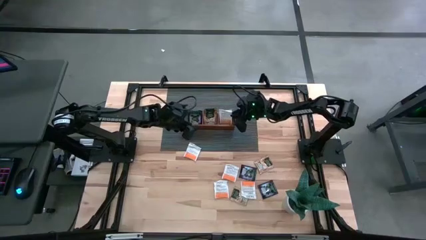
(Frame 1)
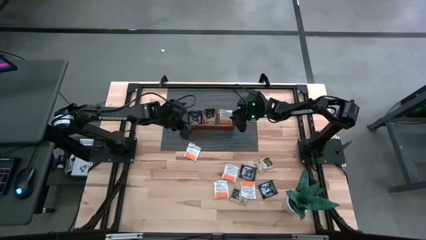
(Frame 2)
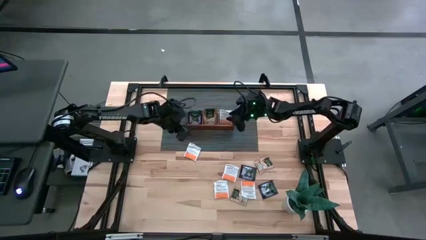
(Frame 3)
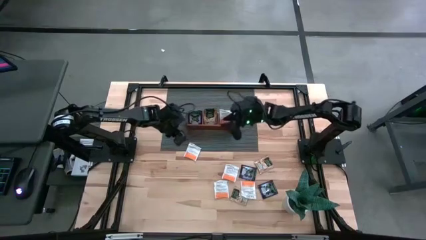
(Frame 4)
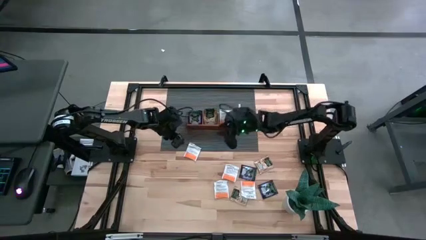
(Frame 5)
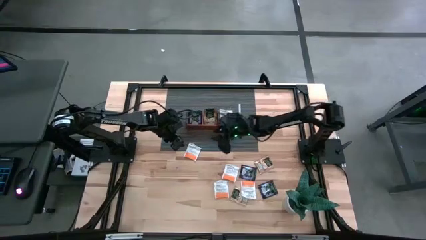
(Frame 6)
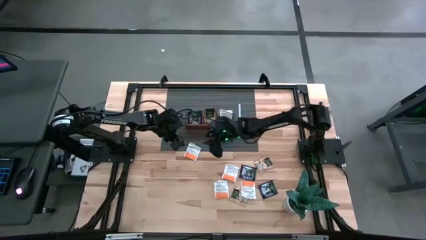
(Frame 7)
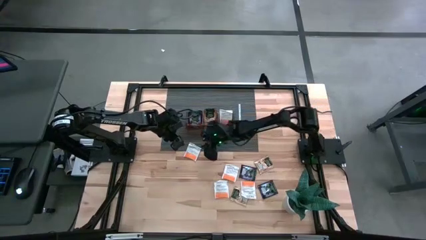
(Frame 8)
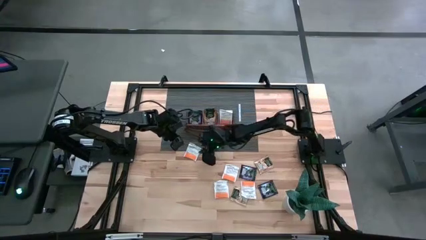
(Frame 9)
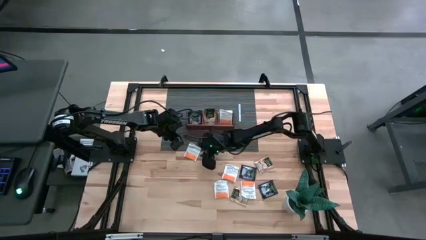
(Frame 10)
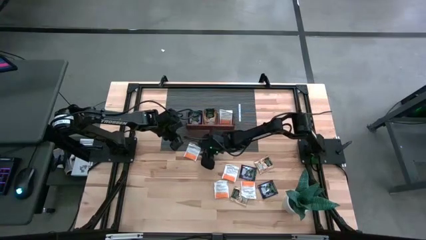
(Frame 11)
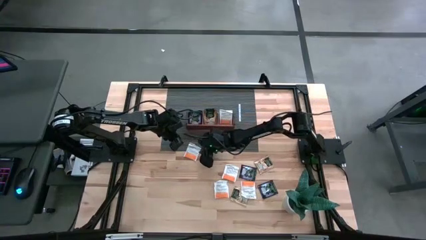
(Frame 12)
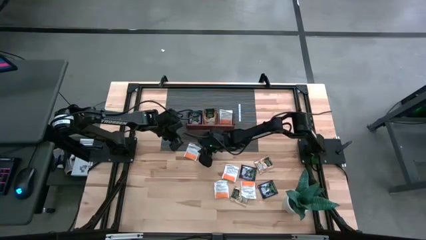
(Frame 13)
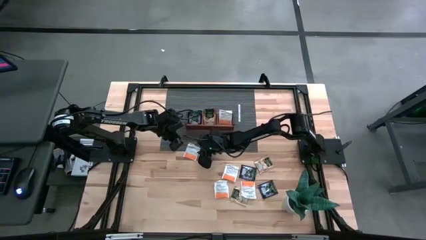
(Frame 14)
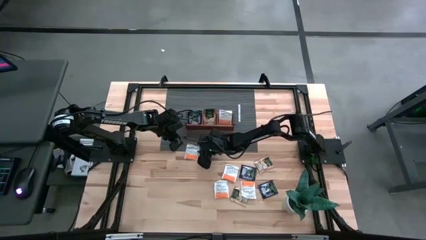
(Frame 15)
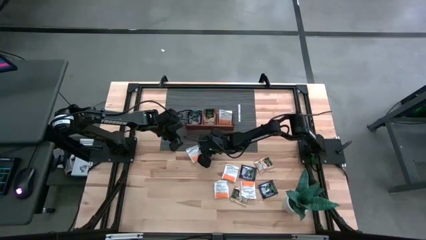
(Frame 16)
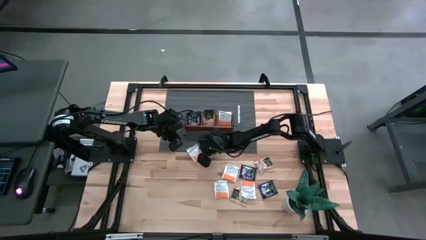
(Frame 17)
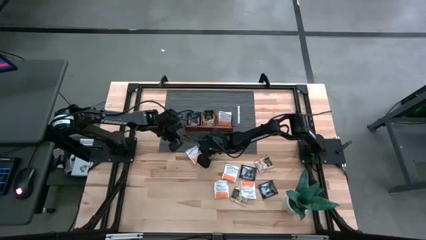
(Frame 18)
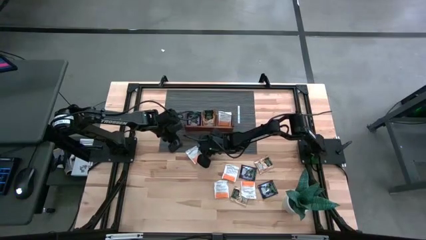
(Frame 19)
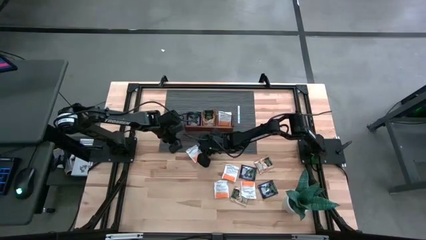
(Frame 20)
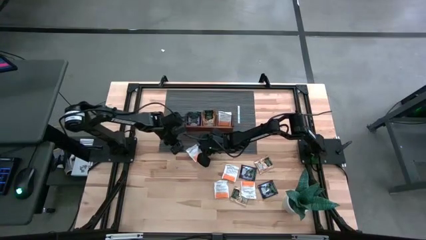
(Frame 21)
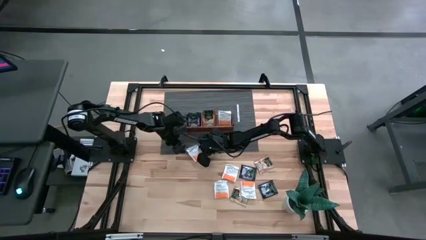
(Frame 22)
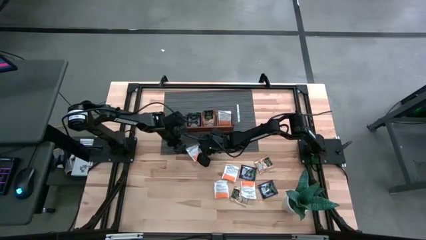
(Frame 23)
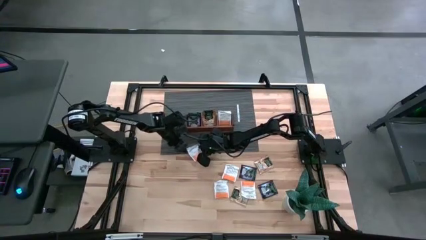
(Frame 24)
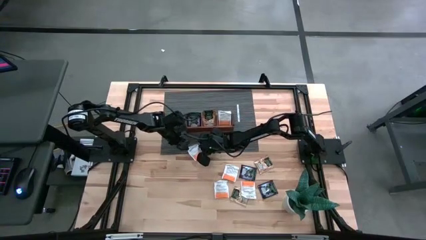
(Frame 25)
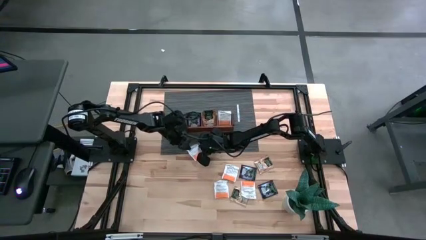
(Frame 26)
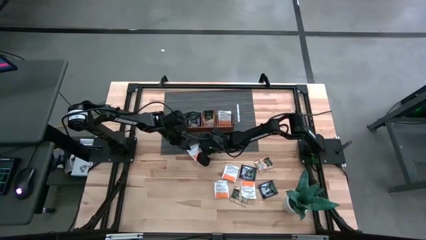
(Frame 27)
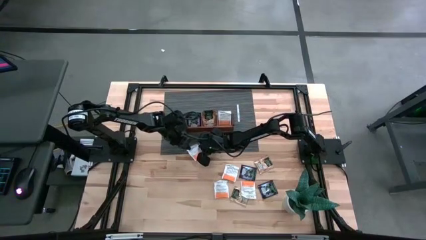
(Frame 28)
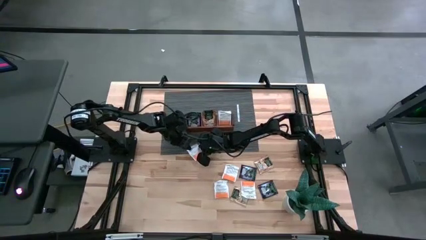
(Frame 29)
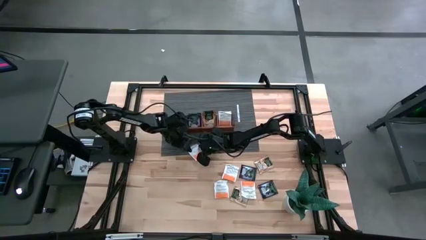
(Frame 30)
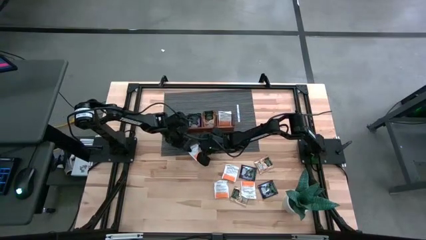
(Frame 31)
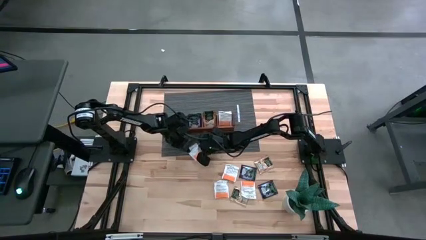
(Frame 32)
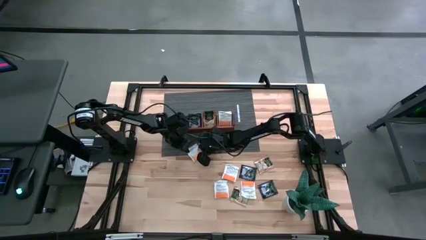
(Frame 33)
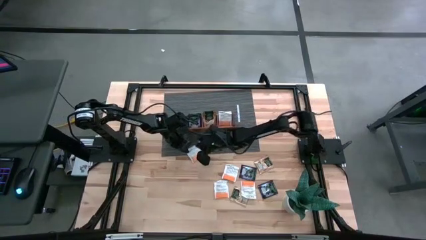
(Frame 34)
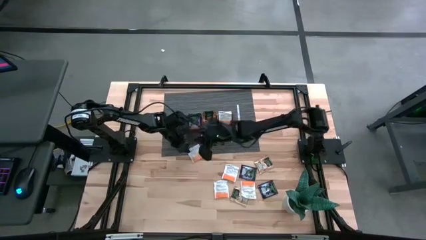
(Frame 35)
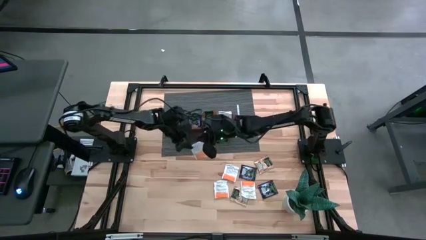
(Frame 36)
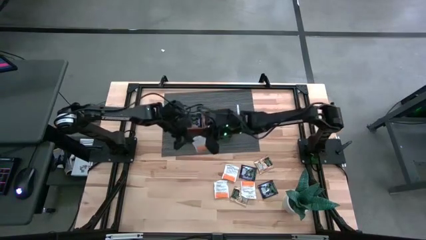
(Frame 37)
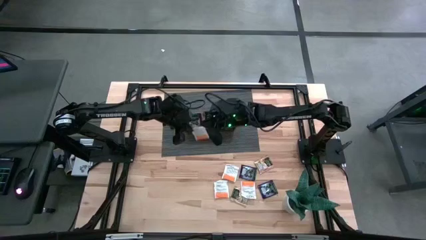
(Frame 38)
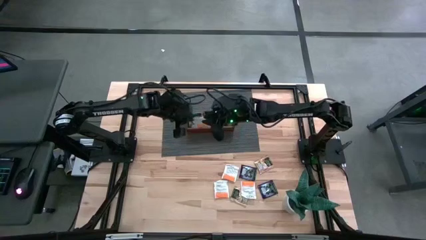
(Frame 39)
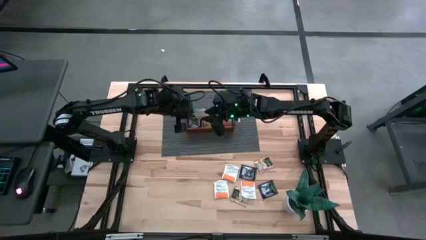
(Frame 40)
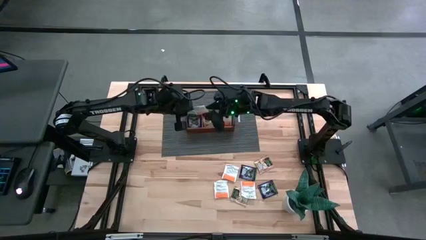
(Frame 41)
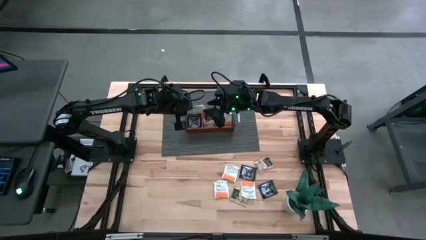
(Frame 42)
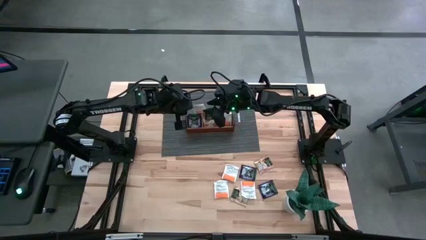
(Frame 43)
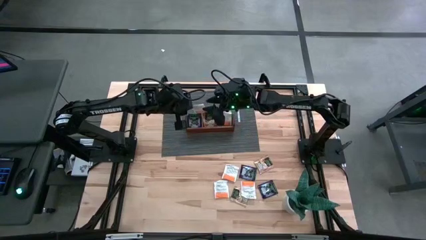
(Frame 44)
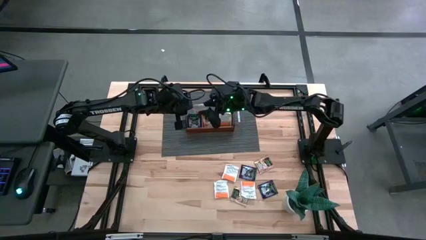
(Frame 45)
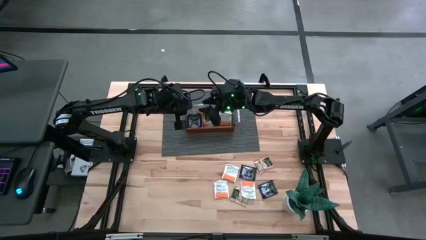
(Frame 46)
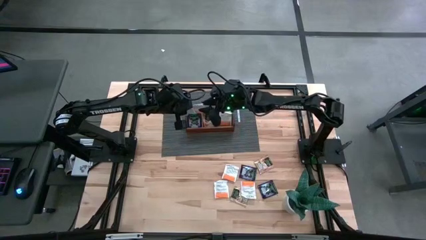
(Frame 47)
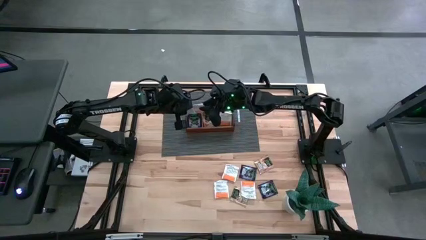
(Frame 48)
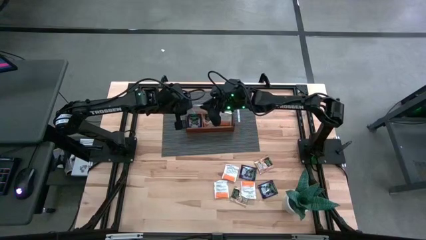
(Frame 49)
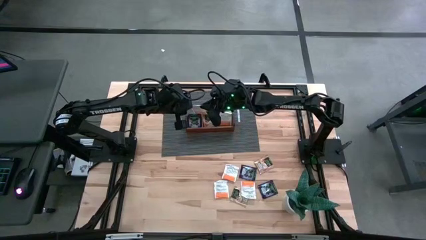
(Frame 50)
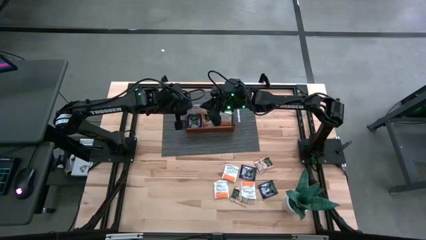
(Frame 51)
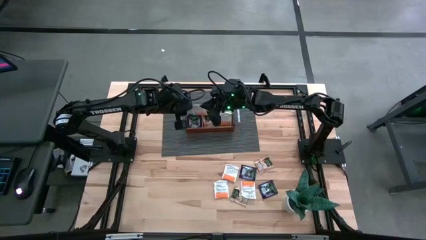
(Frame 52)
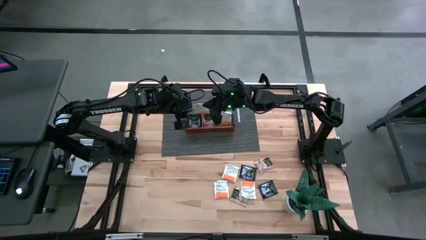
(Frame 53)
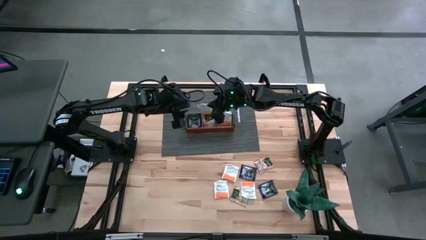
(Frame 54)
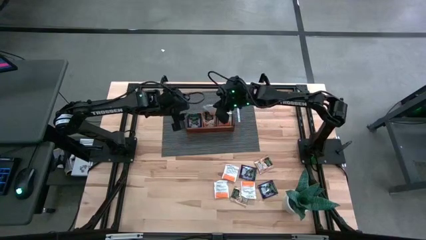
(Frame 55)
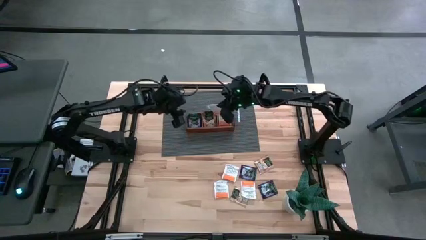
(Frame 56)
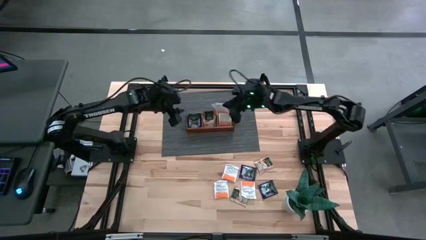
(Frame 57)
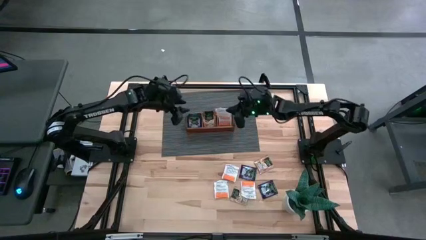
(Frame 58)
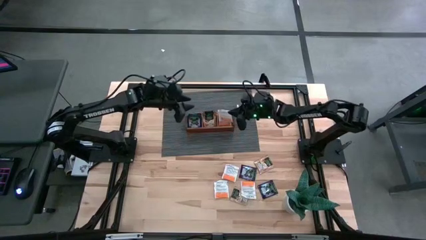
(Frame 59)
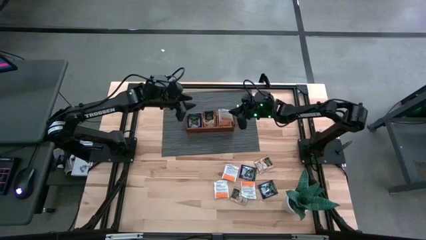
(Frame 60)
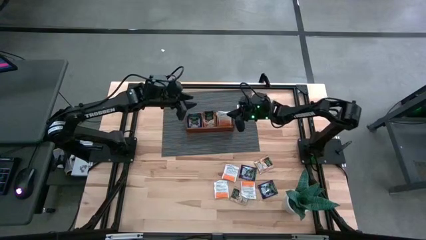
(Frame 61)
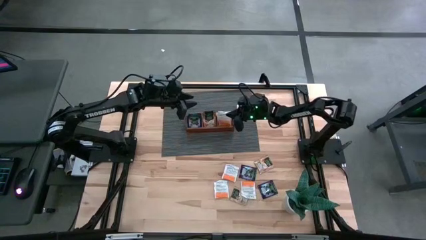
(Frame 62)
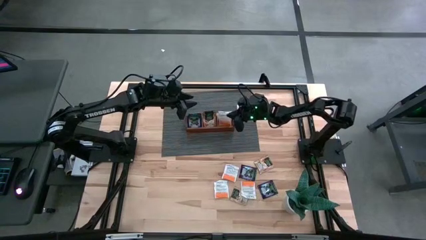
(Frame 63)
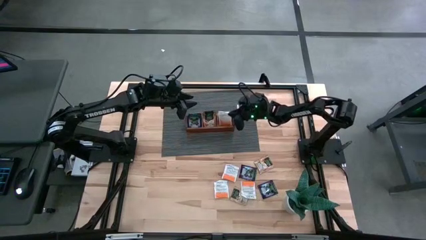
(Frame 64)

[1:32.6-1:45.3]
Task: Pick & Place Tea
Put the orange tea bag into the right section of the wooden organizer

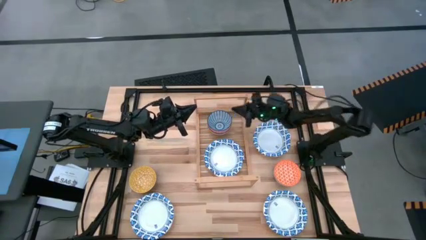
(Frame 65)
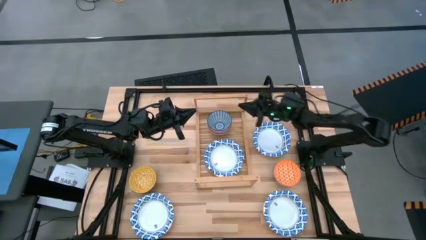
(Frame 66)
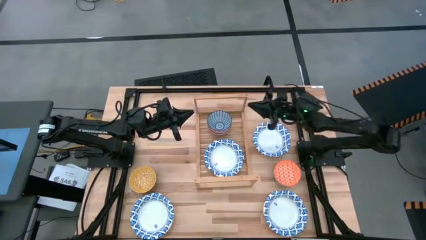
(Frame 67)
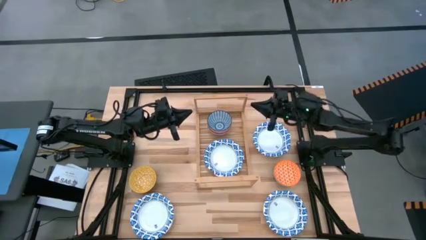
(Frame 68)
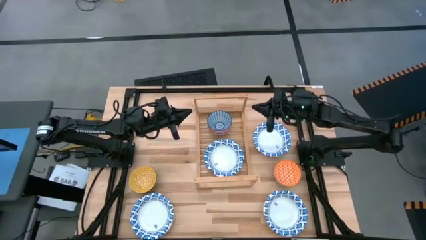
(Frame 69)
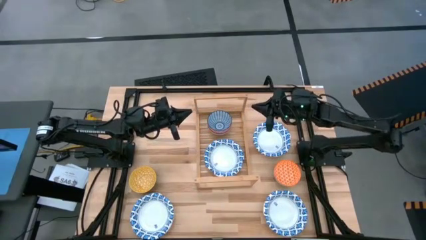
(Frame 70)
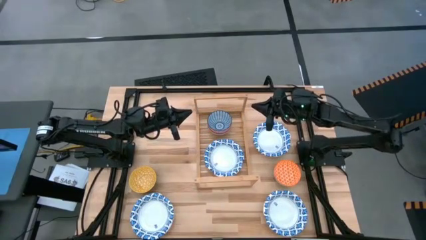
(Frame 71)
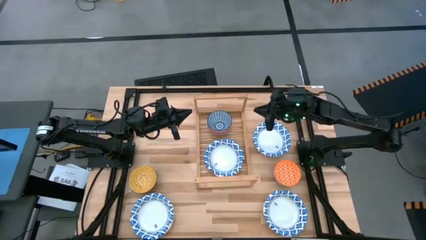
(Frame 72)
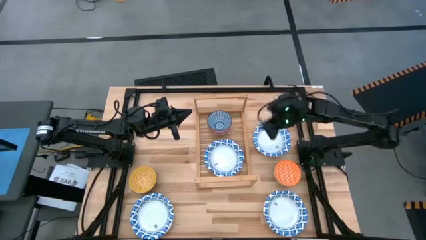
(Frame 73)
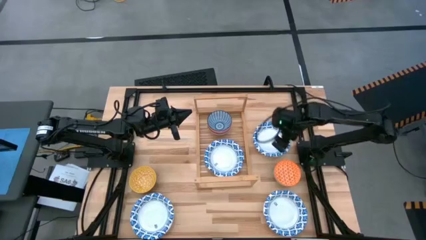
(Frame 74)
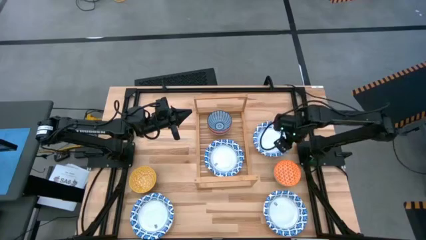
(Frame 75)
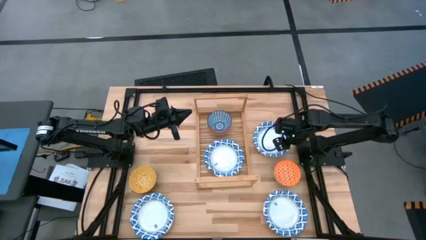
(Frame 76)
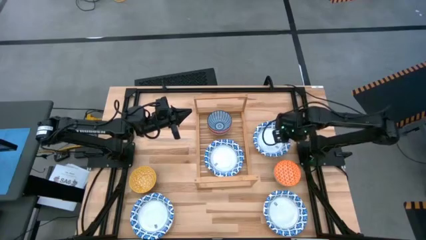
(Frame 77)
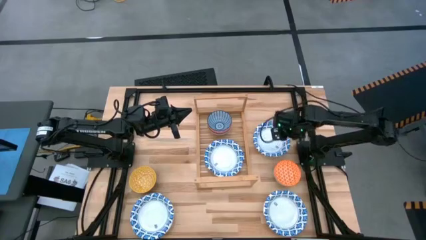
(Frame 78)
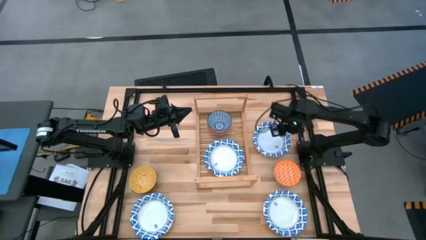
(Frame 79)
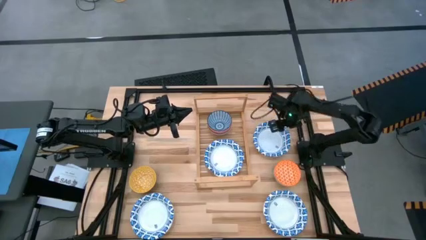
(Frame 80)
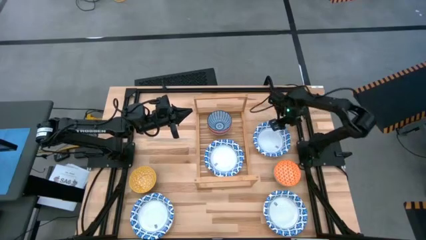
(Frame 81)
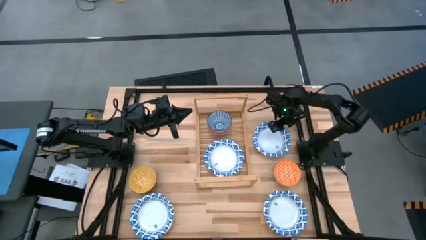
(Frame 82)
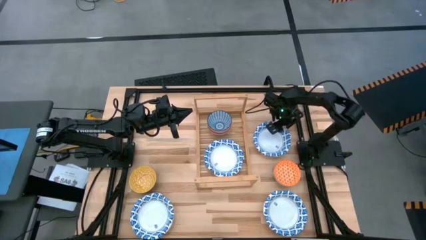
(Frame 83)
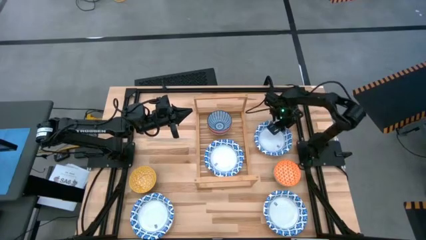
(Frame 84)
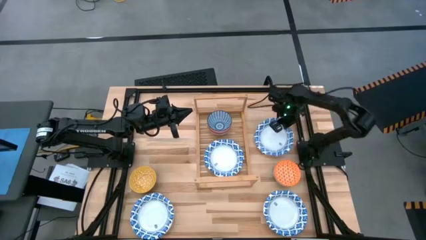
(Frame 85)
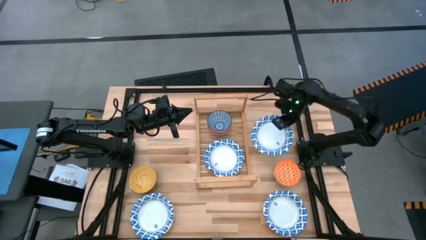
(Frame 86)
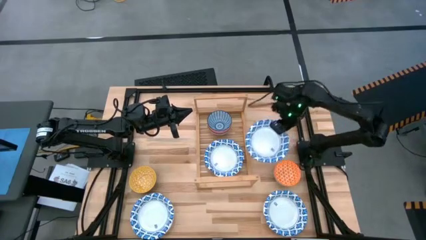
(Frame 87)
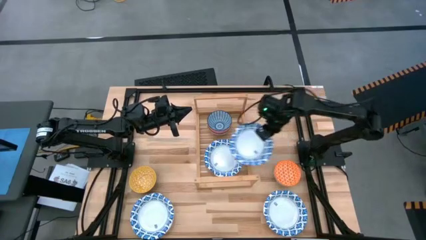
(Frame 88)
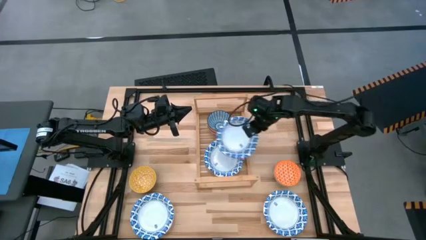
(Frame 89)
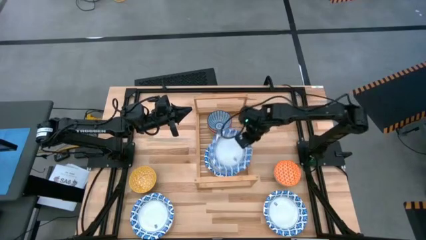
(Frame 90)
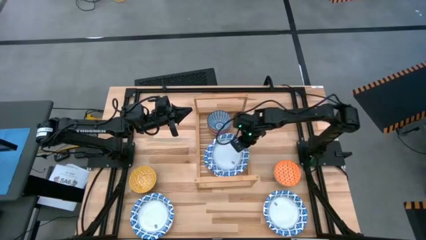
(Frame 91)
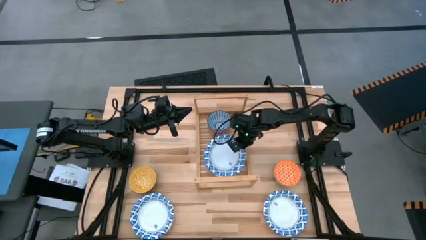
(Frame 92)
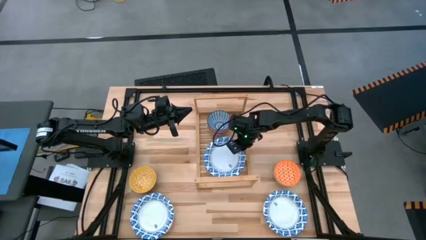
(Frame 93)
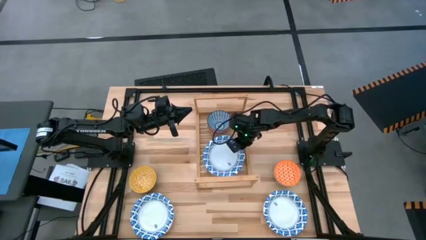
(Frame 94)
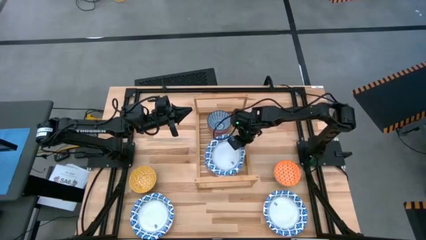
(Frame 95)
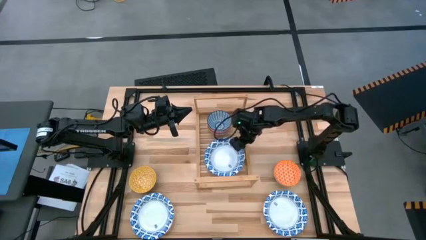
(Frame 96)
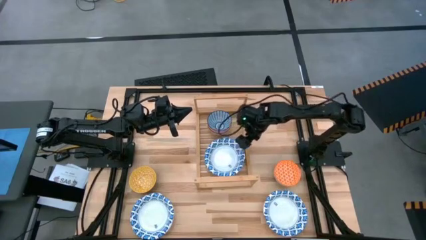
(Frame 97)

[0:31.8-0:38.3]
Task: Place and stack bowls onto a shelf
Stack the blue white bowl on top of the blue white bowl on the shelf
